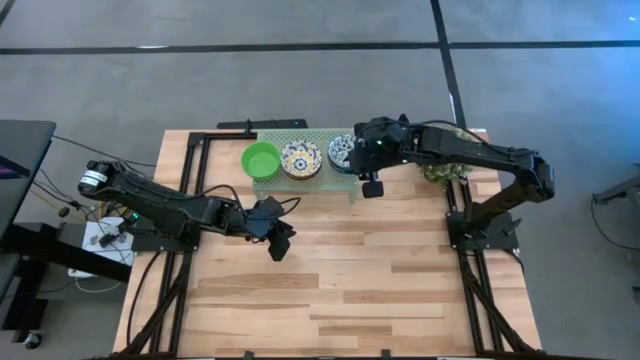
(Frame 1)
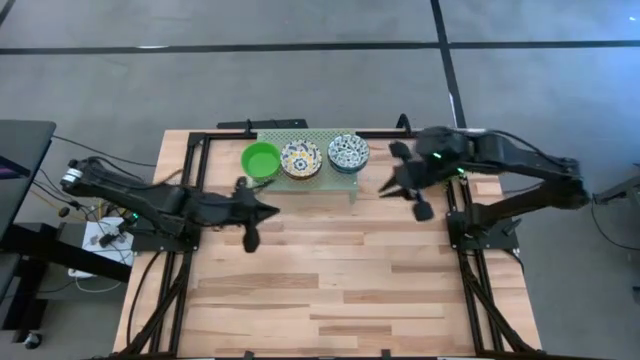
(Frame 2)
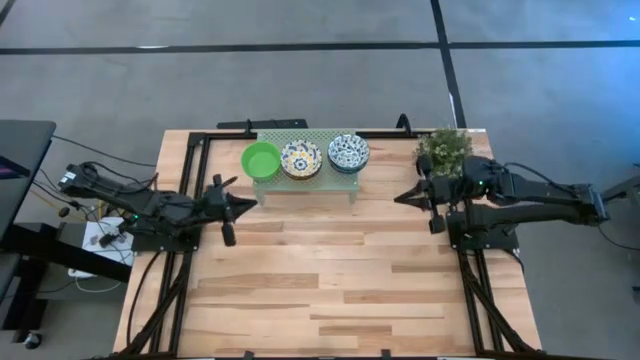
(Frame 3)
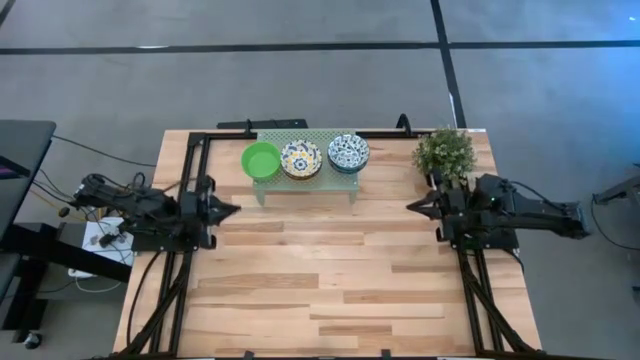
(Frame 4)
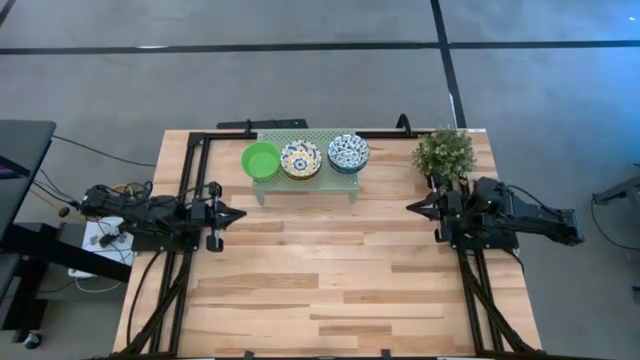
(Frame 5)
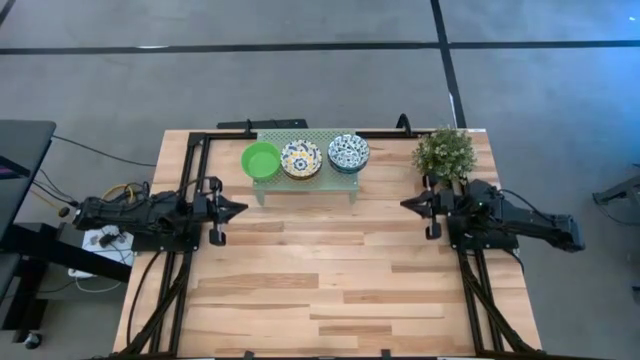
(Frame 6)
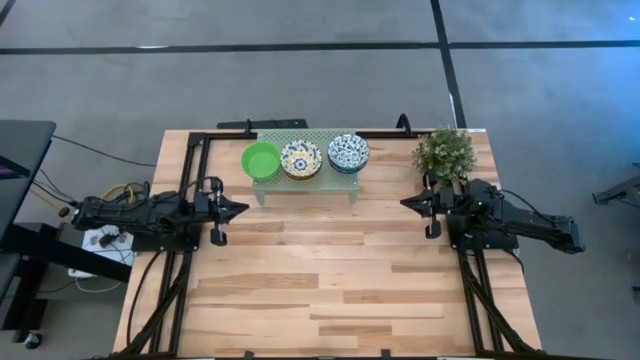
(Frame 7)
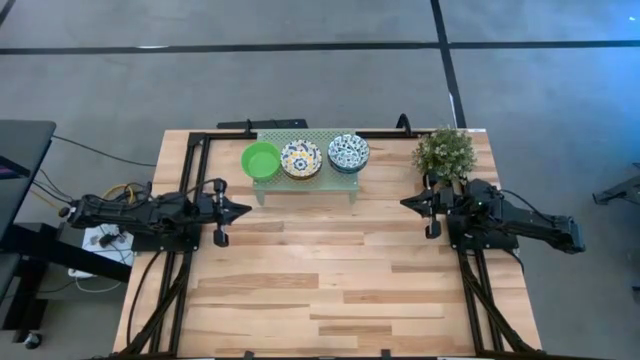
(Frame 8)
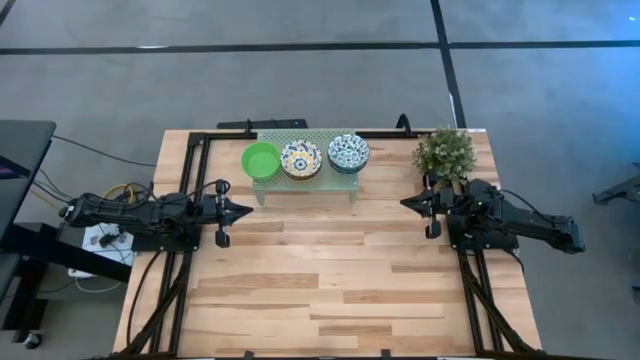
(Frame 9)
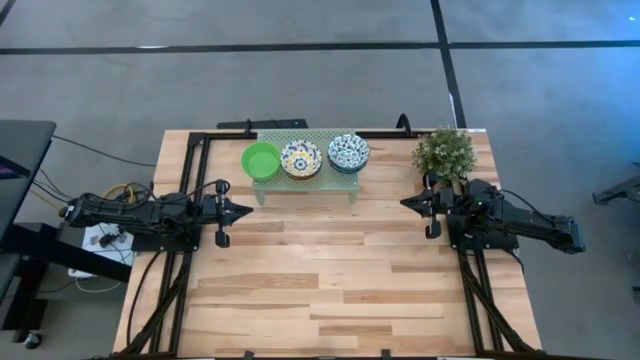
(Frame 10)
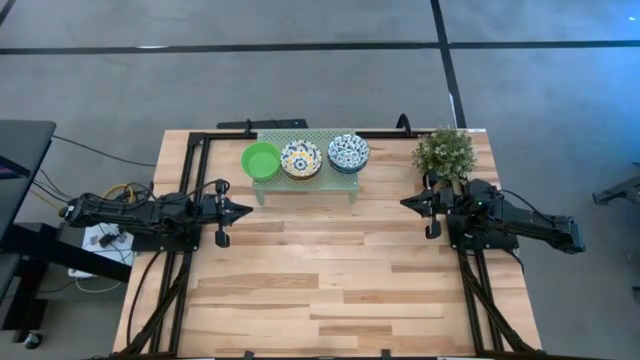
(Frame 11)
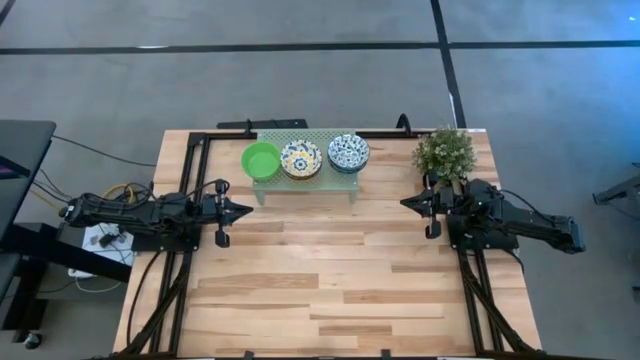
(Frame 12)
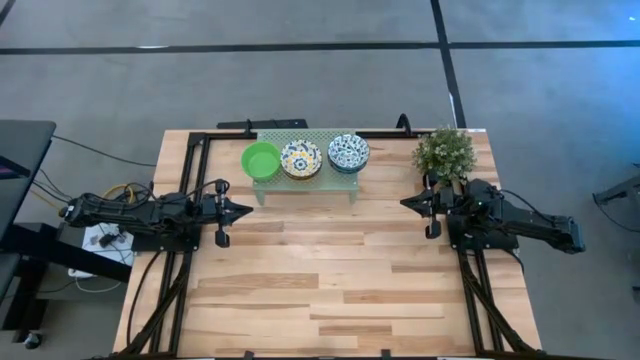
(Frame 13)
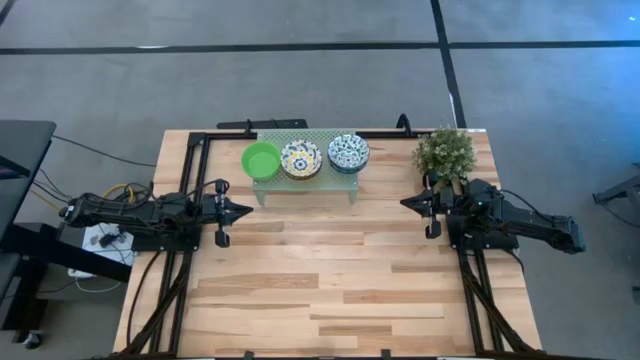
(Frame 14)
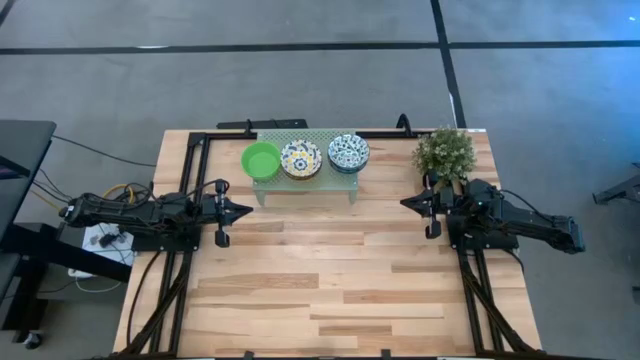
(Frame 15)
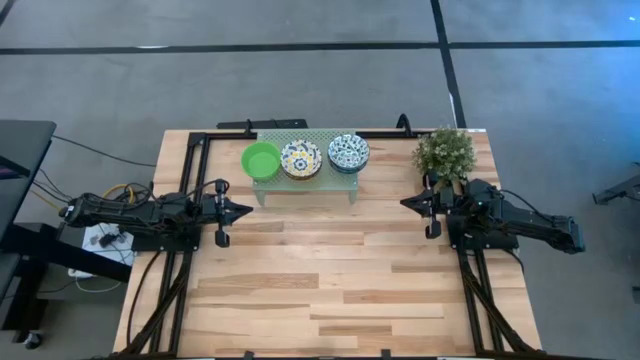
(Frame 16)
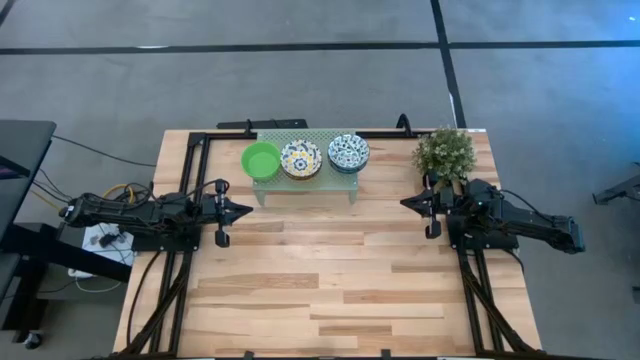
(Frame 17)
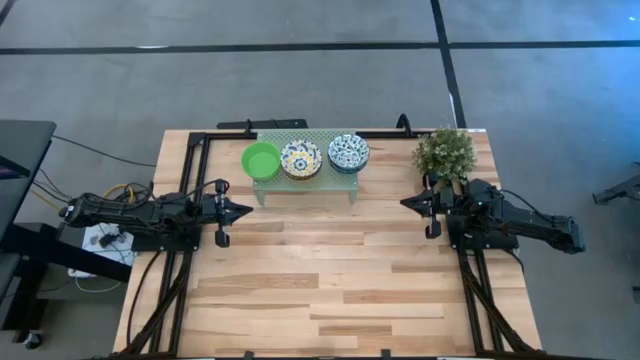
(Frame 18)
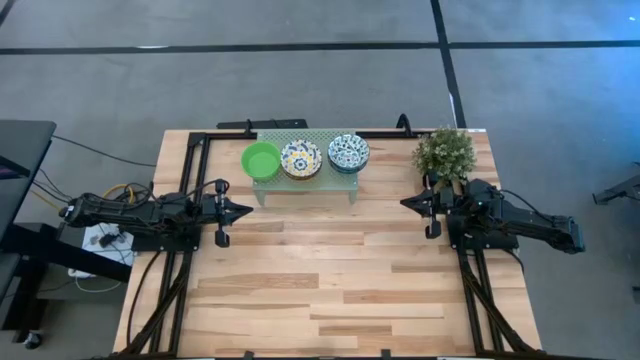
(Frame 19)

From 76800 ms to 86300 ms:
Task: Pick & Place Mini bowls
Return to Home Position

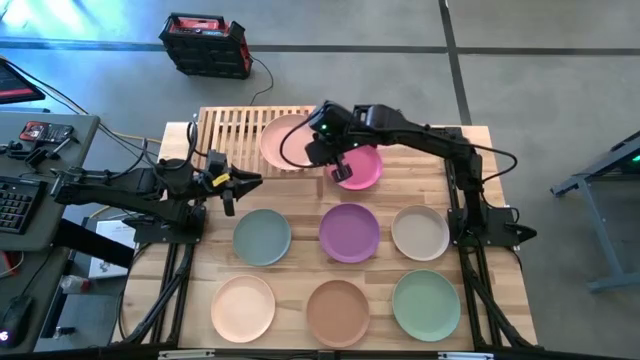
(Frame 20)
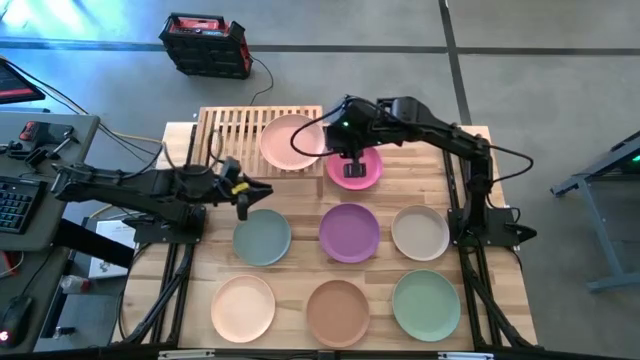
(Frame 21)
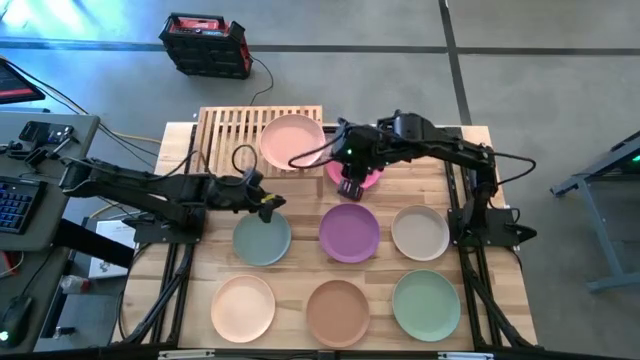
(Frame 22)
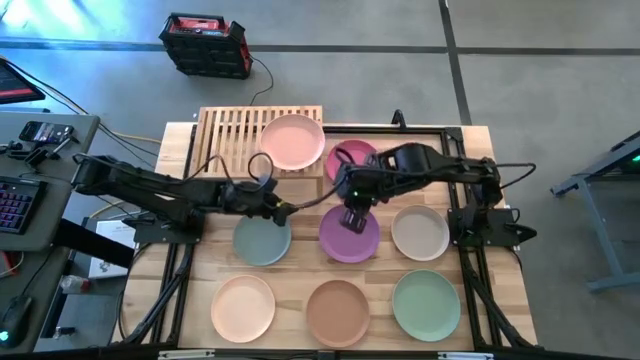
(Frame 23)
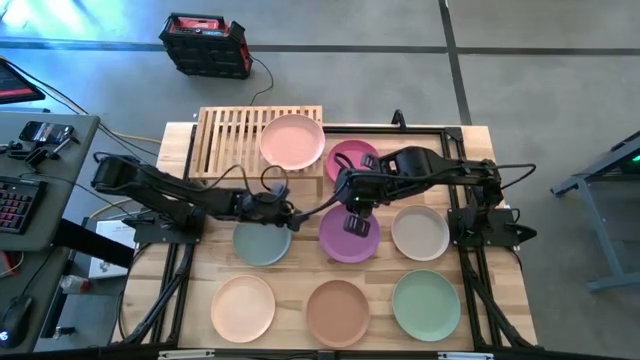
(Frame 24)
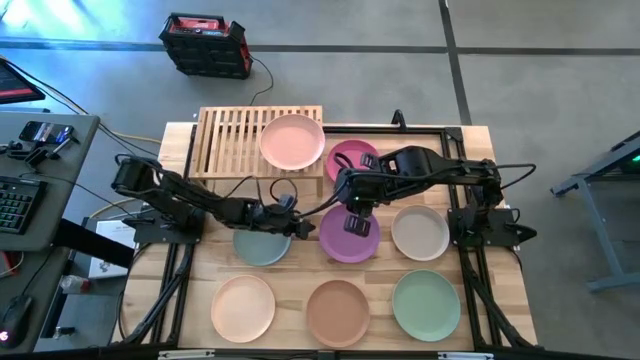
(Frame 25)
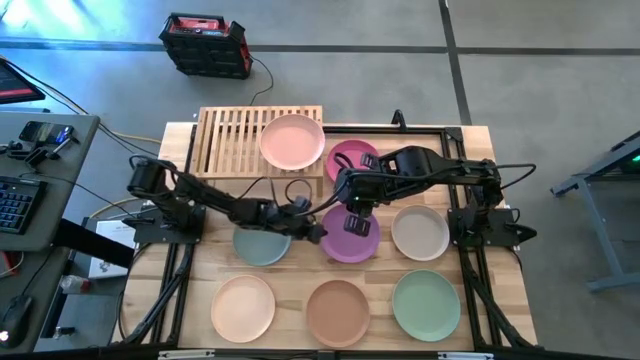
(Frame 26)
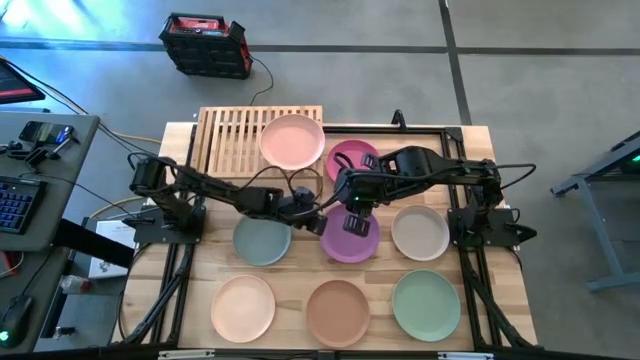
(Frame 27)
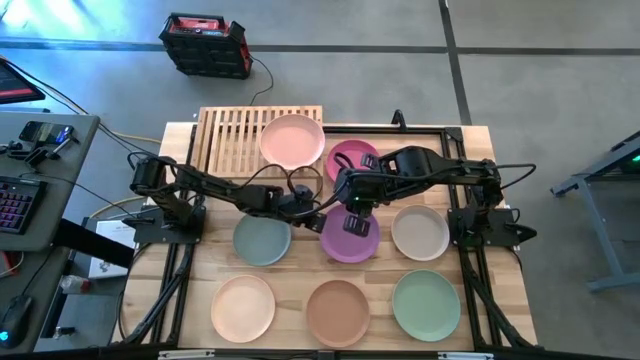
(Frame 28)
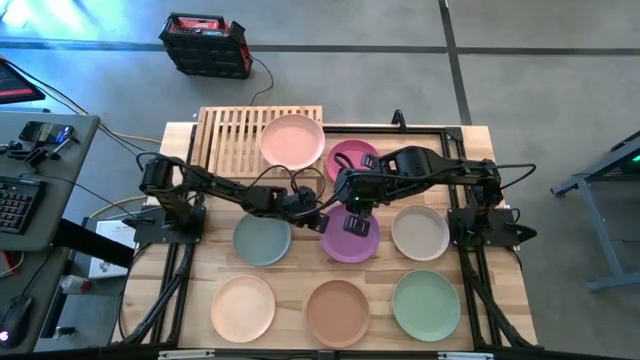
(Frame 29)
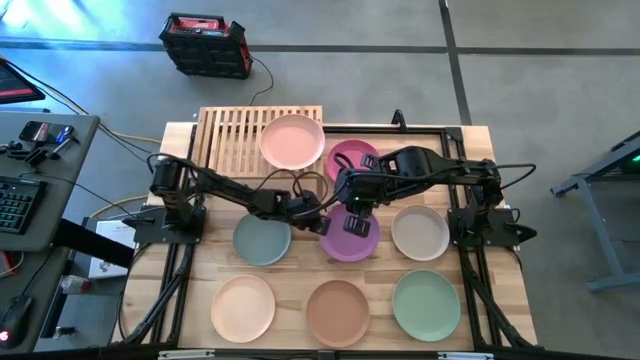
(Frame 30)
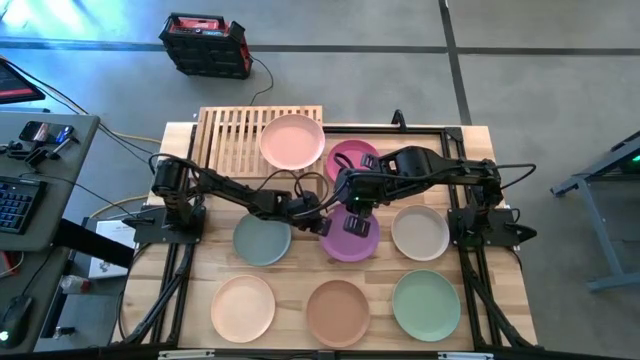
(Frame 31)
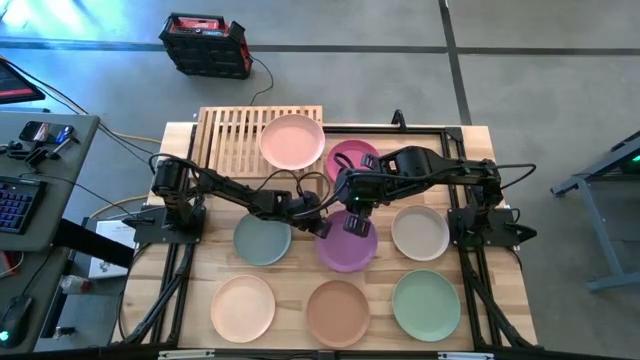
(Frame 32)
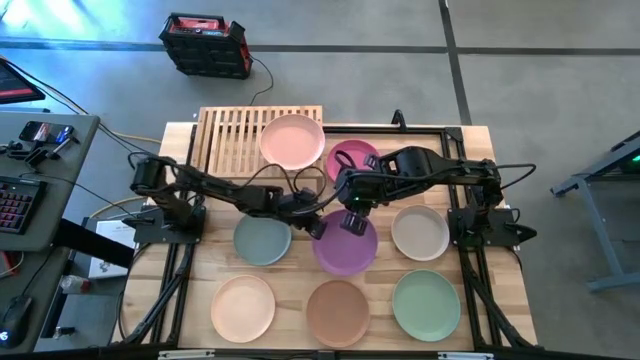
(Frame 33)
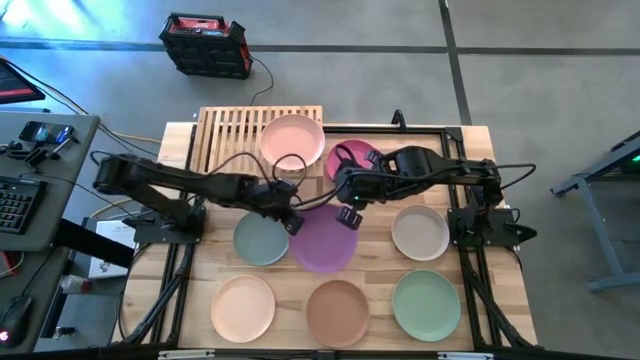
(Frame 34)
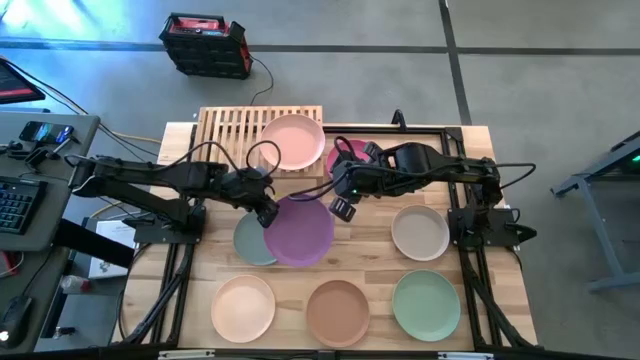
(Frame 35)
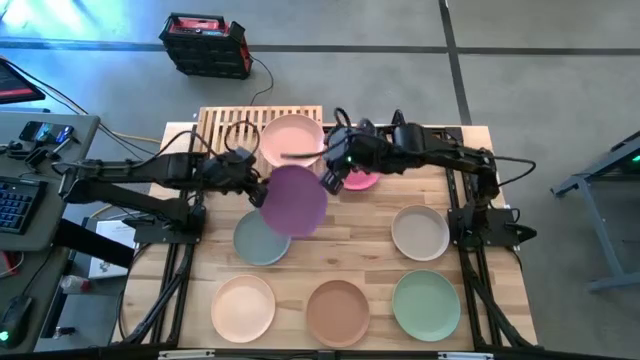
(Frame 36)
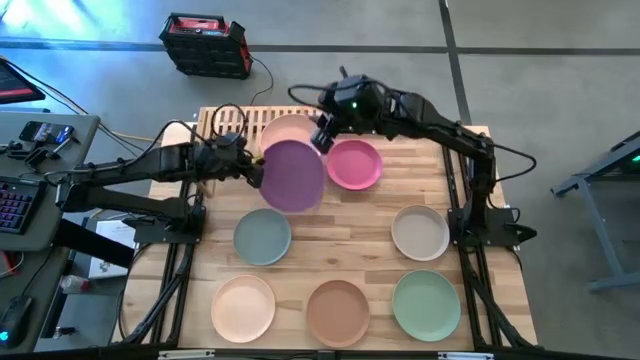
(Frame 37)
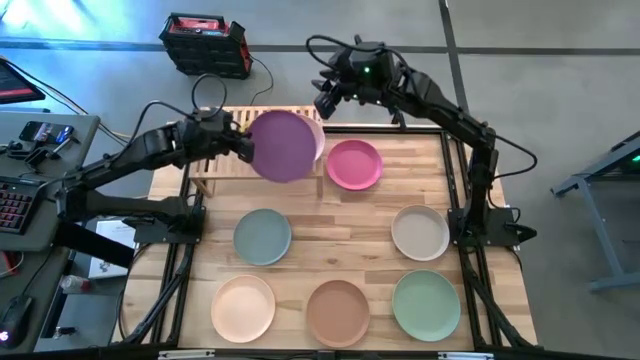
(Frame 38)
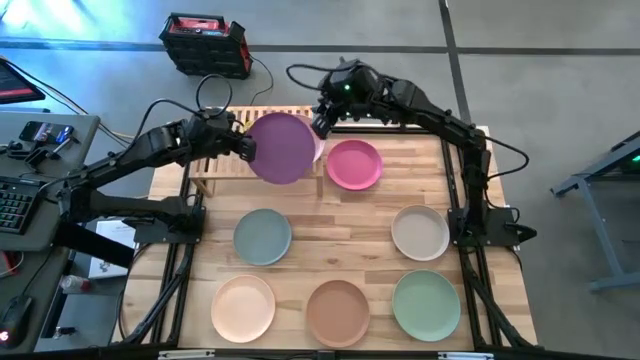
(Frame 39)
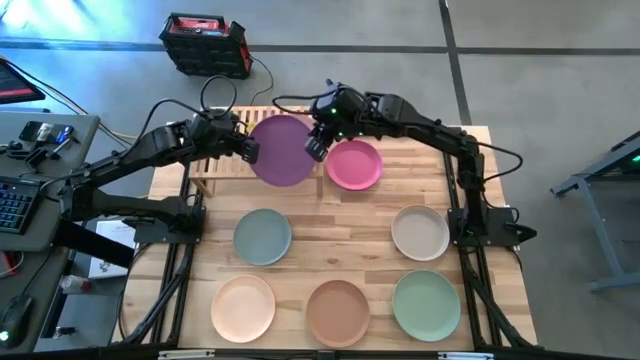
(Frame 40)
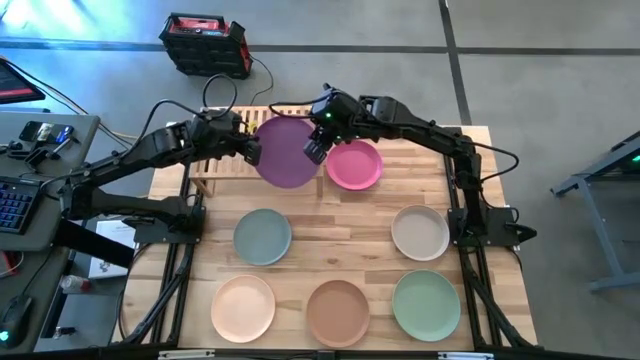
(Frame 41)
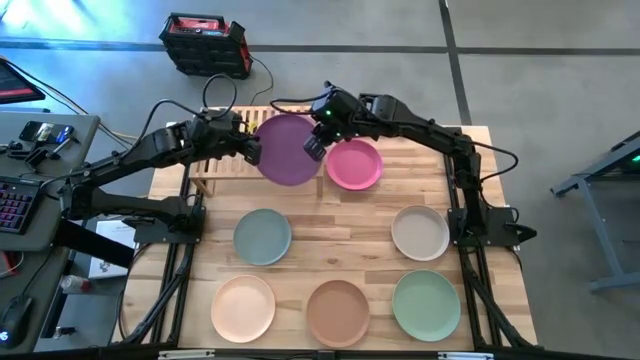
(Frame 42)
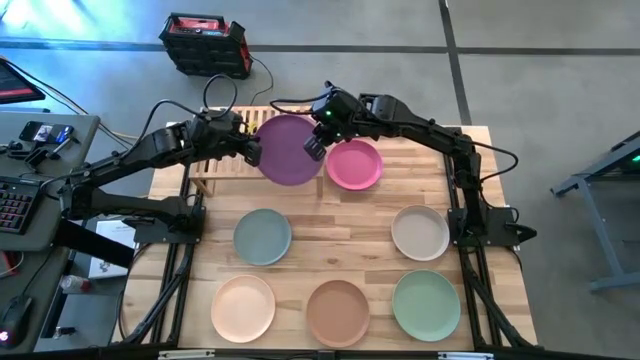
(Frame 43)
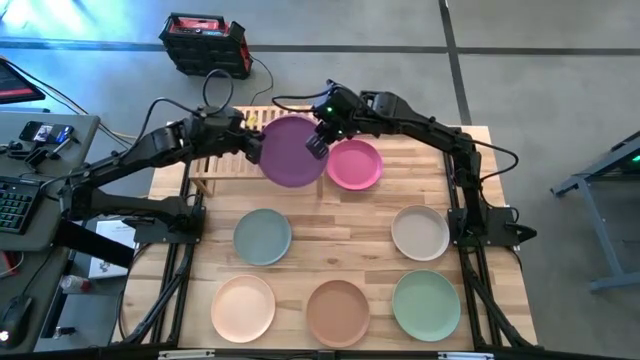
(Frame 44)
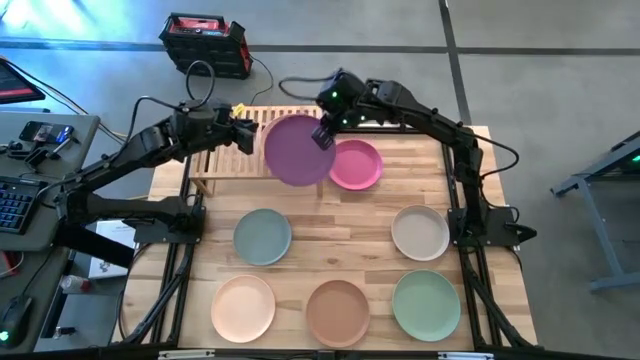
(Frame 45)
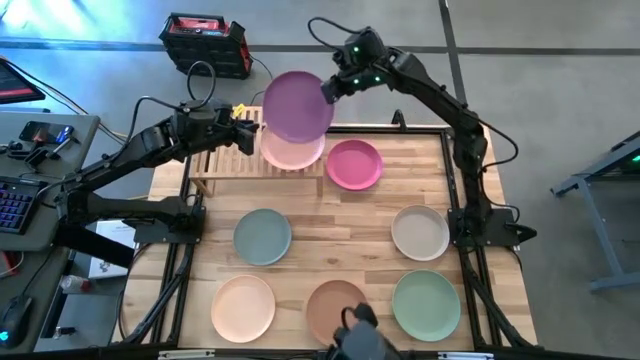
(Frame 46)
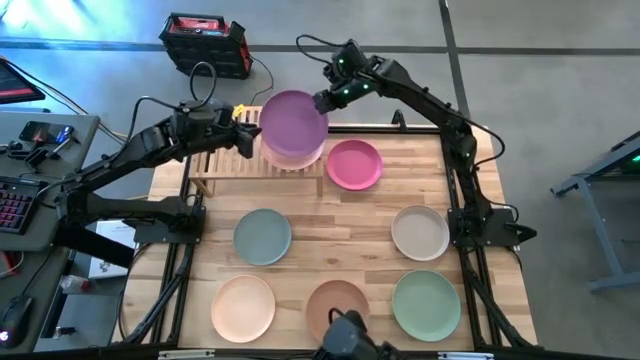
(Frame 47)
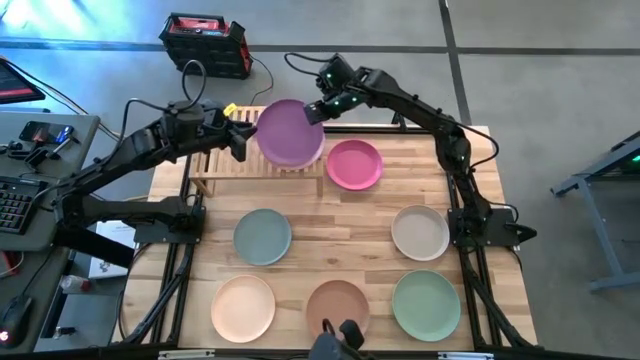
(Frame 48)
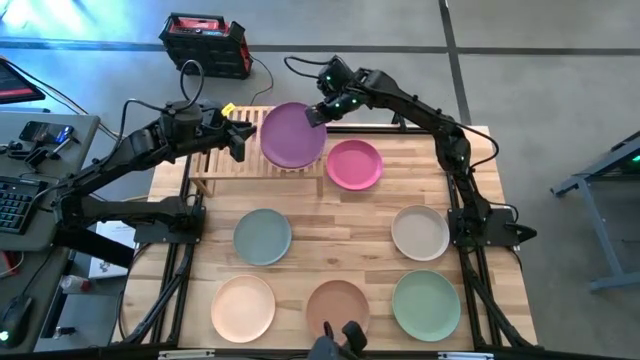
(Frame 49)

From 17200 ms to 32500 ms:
Task: Place and stack plates onto a shelf
Stack the violet plate on top of the light orange plate on the shelf
